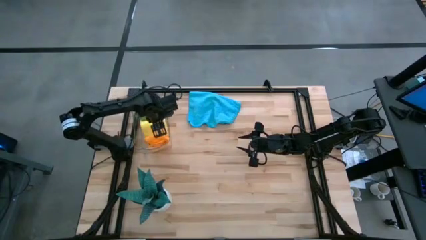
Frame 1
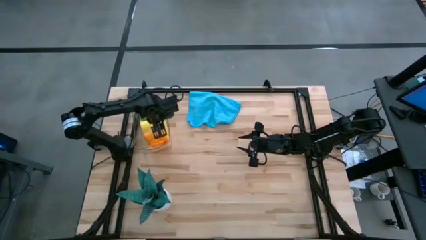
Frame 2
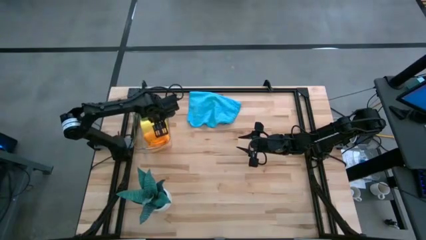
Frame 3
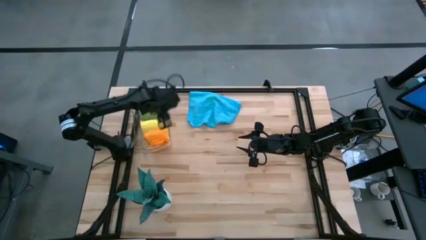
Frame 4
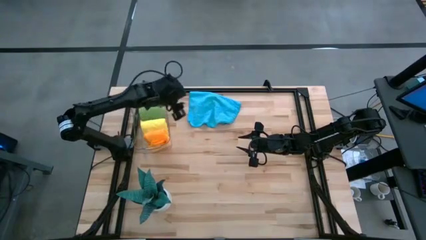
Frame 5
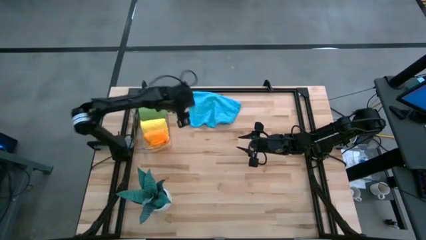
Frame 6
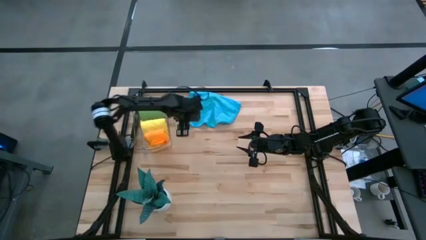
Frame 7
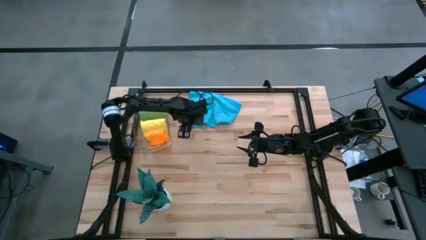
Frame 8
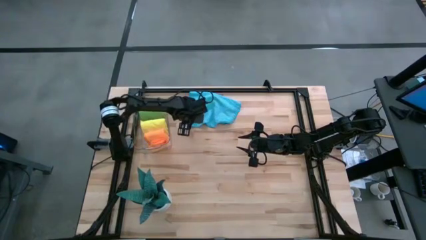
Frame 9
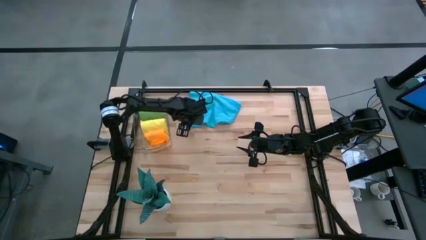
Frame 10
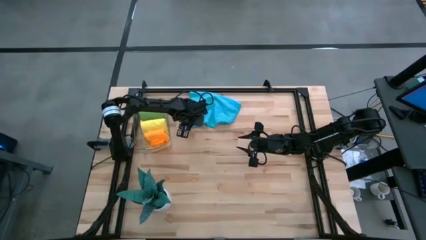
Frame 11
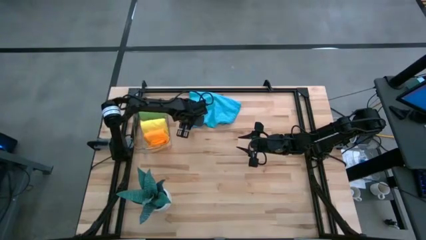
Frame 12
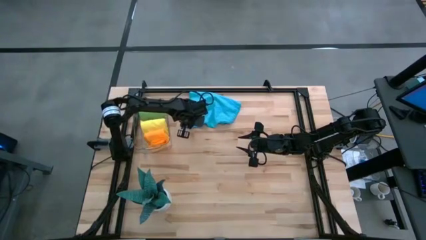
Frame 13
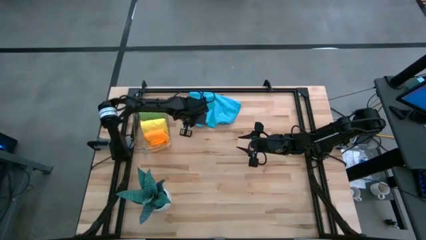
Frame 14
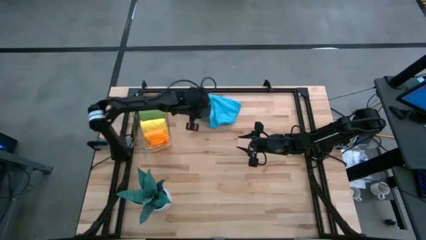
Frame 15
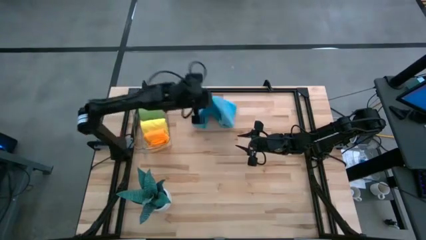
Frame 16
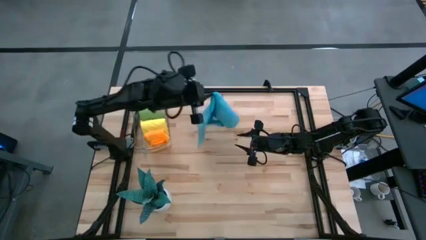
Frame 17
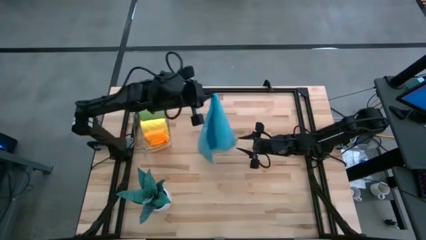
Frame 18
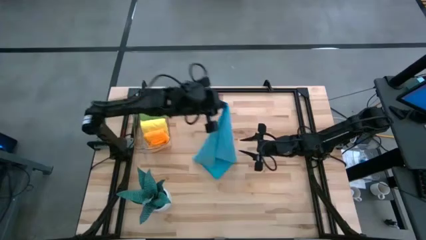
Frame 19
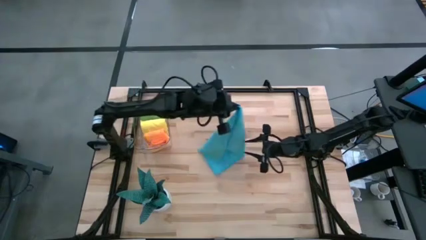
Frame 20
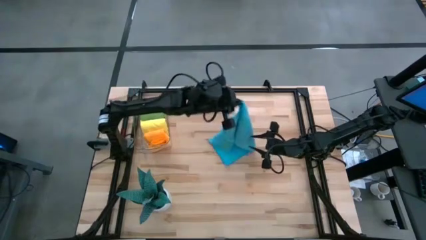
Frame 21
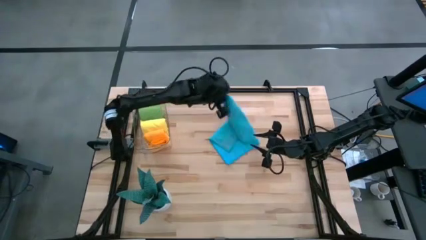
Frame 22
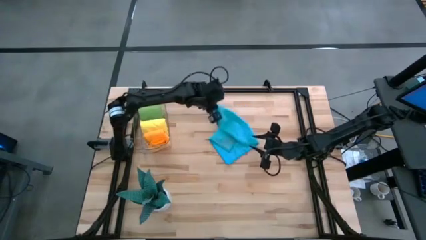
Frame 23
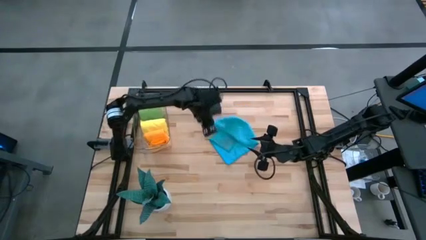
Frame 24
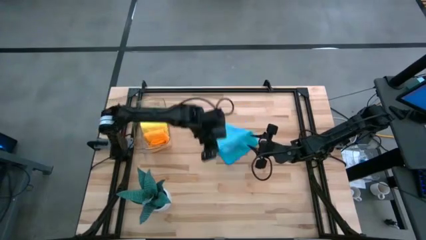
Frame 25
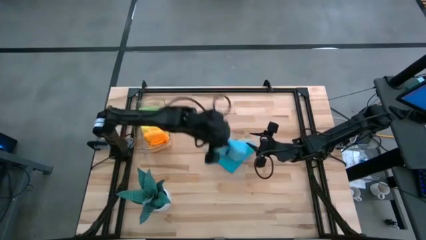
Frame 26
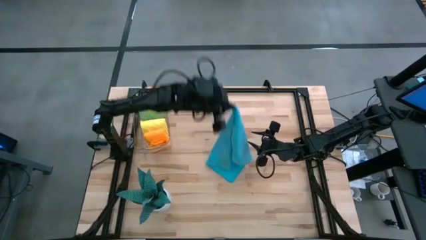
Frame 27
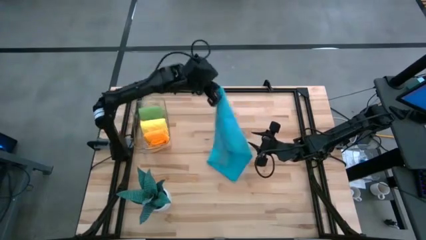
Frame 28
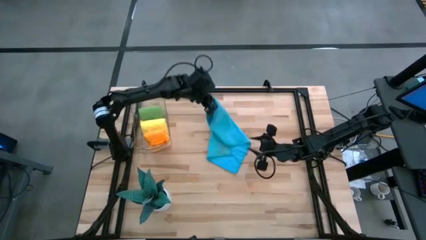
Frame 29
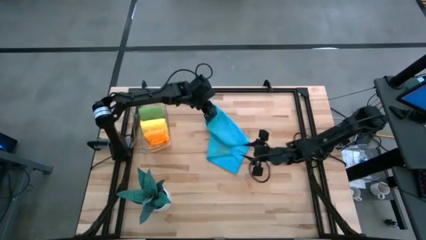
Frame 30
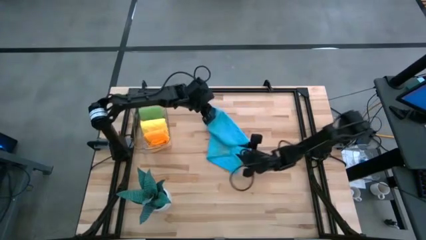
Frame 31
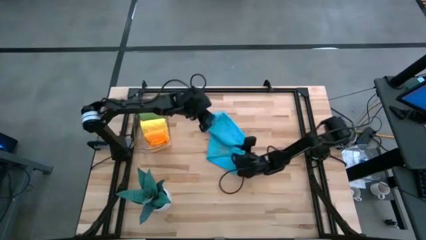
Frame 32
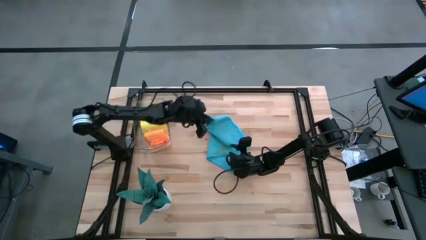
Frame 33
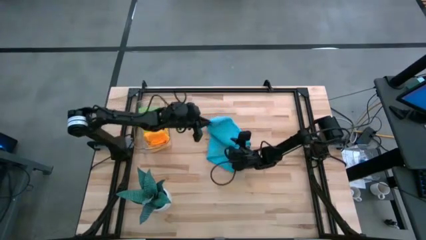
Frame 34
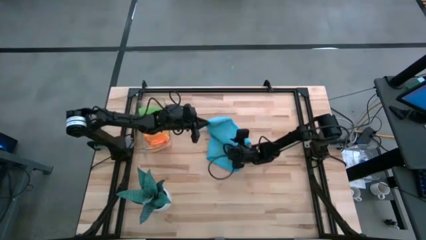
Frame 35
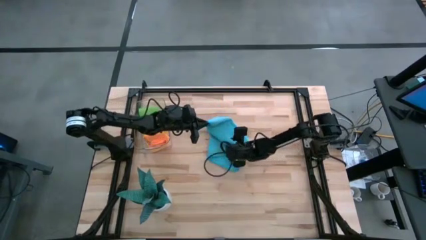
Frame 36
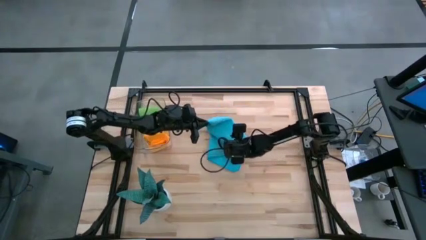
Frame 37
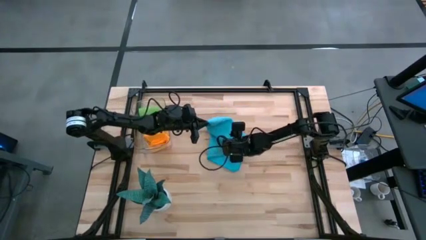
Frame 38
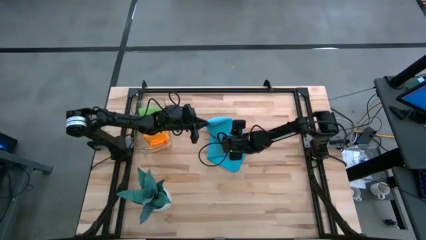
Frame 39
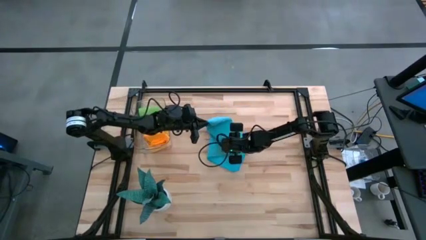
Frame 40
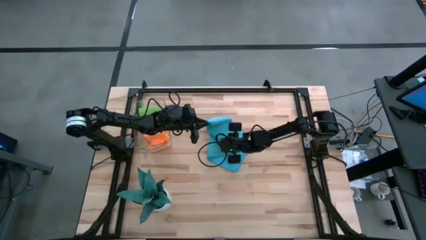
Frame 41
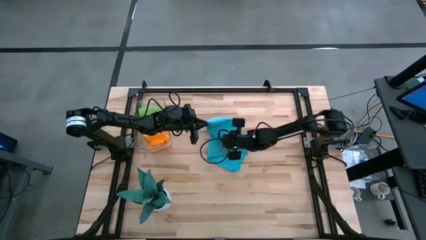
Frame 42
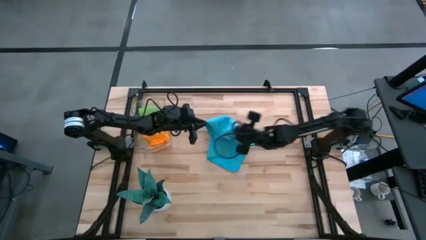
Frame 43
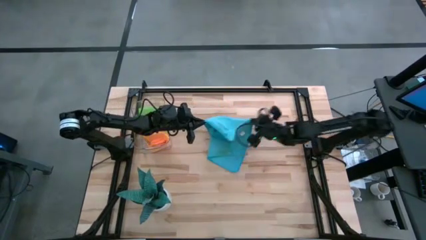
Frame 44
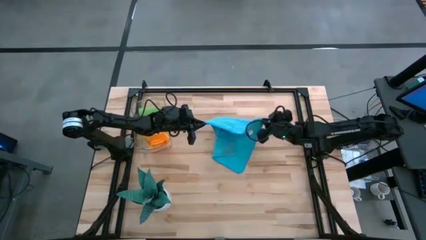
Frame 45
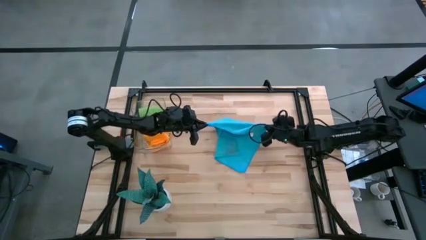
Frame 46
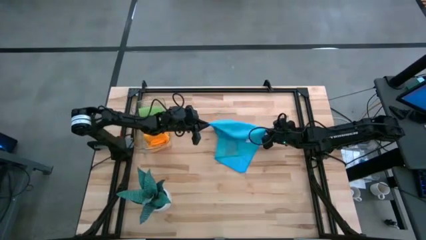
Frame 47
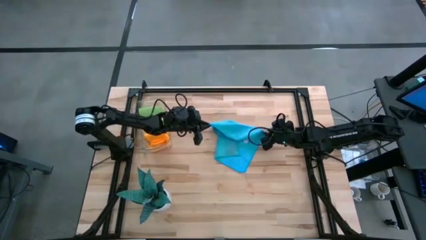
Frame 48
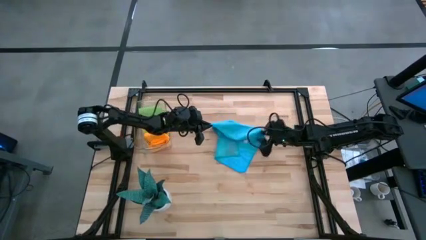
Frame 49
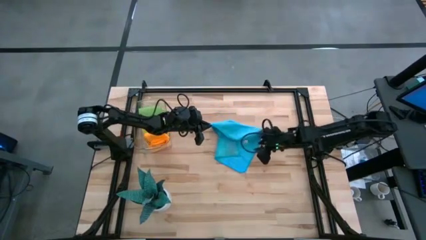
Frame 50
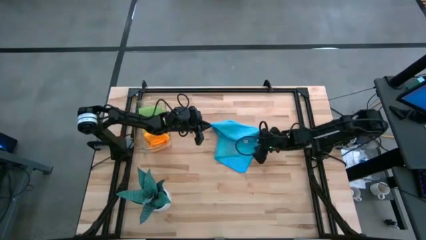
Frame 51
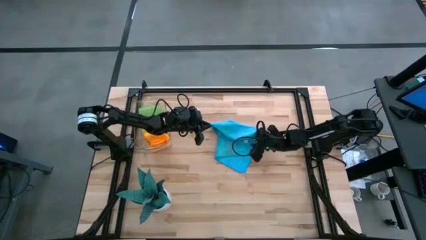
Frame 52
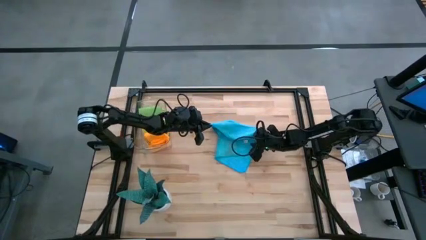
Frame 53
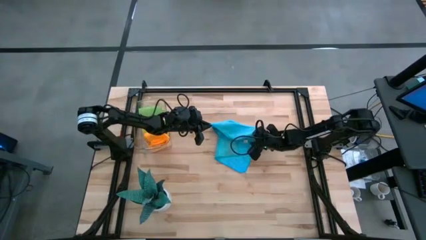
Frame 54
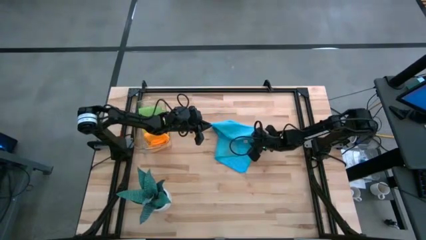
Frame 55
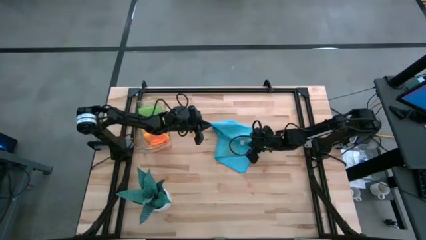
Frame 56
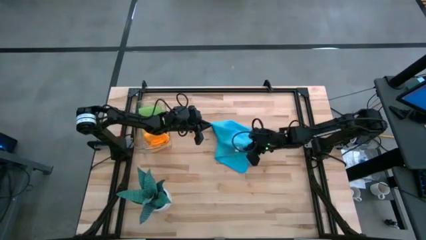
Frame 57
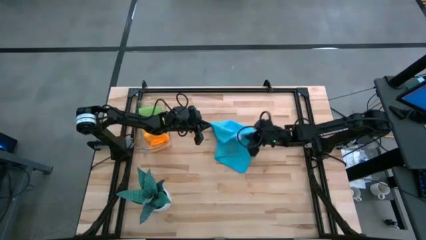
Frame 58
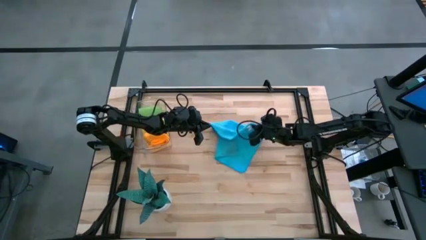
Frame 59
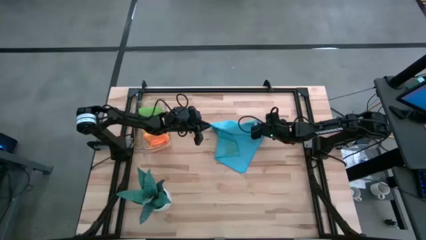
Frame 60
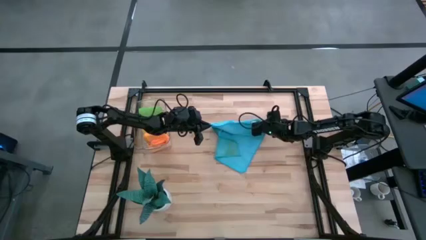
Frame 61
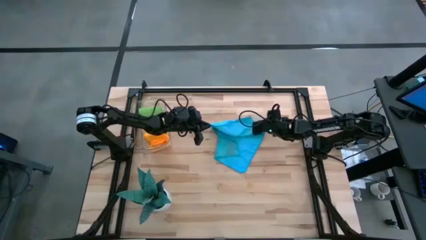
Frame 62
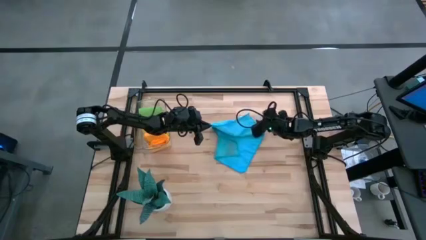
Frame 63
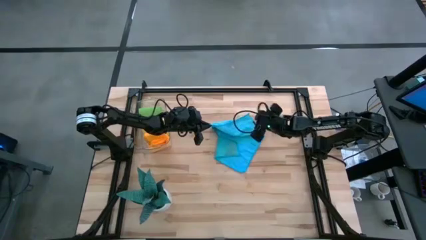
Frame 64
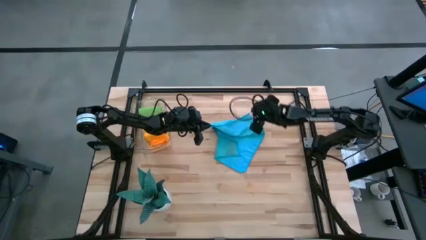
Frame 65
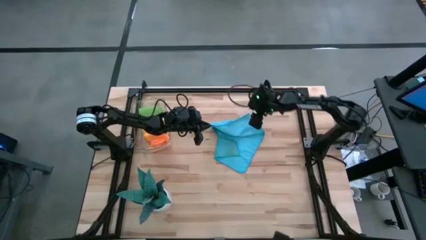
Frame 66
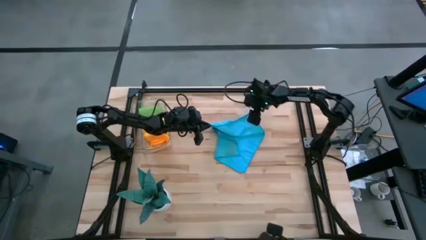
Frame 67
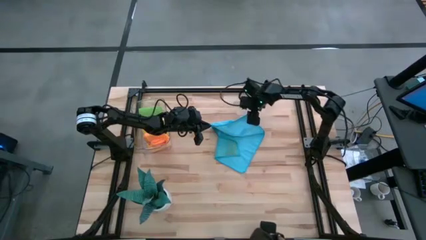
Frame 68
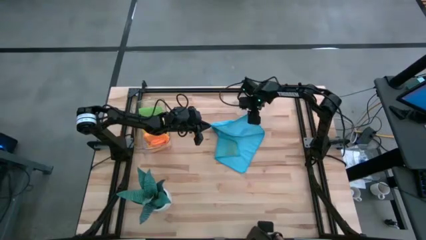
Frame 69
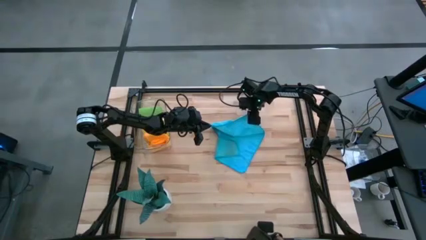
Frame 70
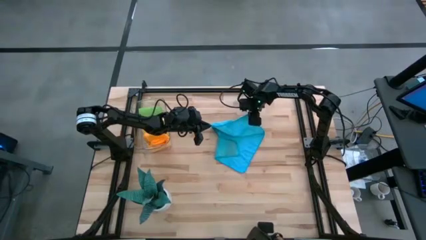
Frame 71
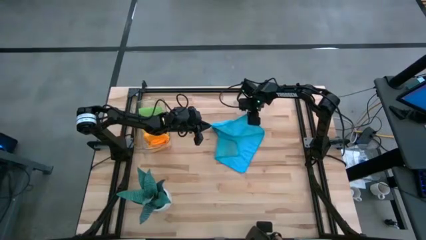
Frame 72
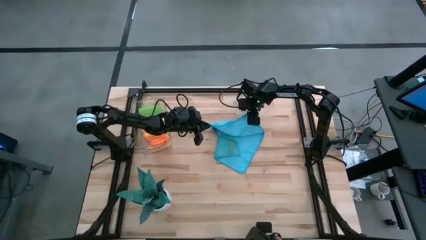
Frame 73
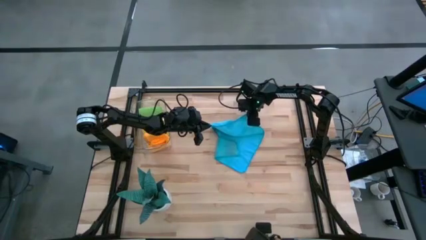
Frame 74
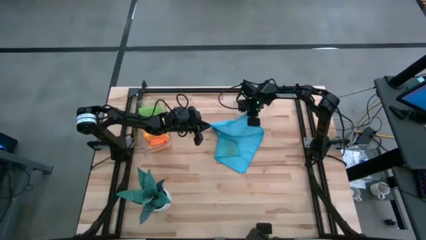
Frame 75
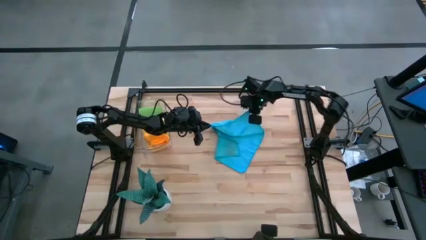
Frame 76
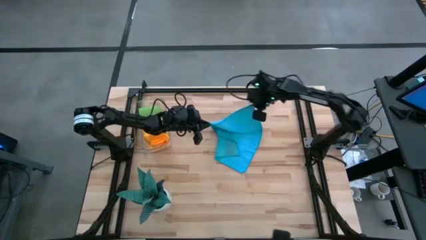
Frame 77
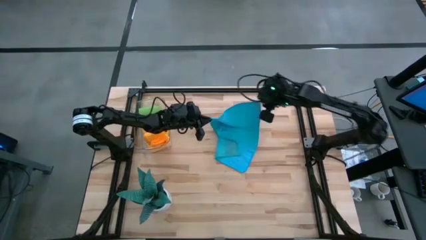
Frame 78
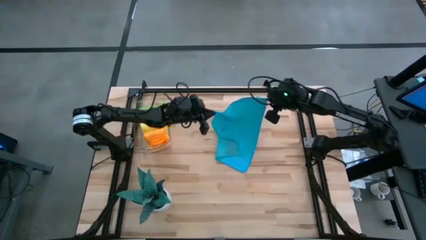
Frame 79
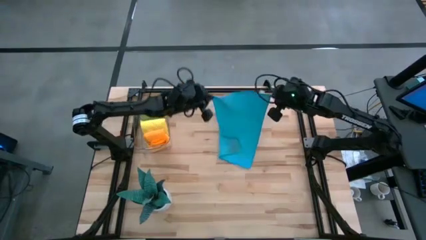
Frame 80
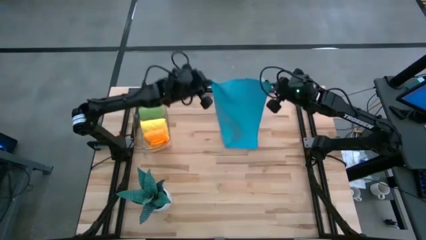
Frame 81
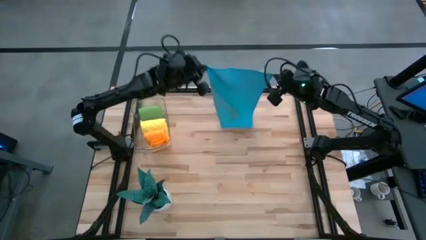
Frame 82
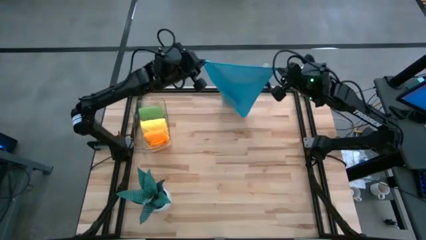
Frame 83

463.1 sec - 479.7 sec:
Task: Roll microfiber towels into tight, uniform cylinder then place into a basket
Fold the blue microfiber towel
